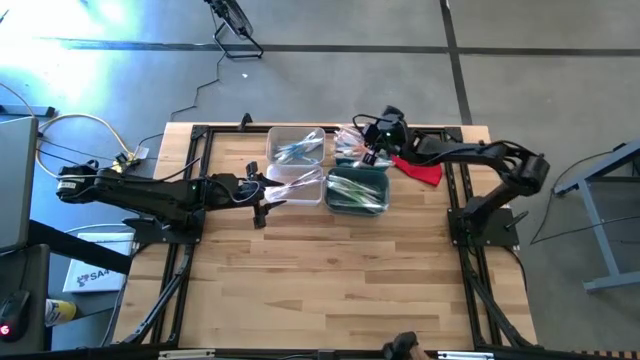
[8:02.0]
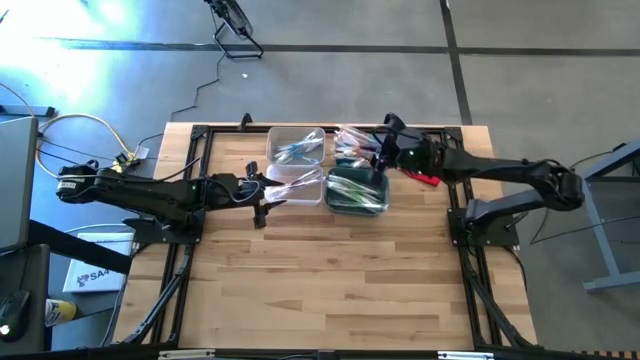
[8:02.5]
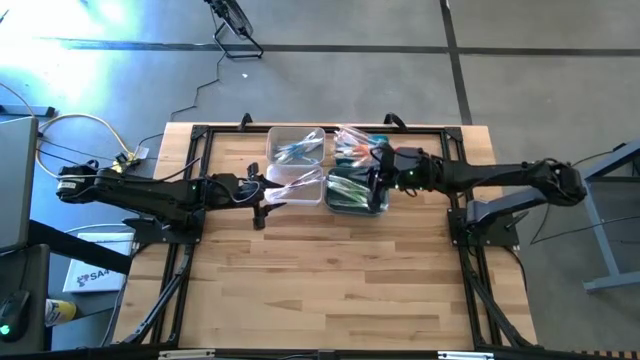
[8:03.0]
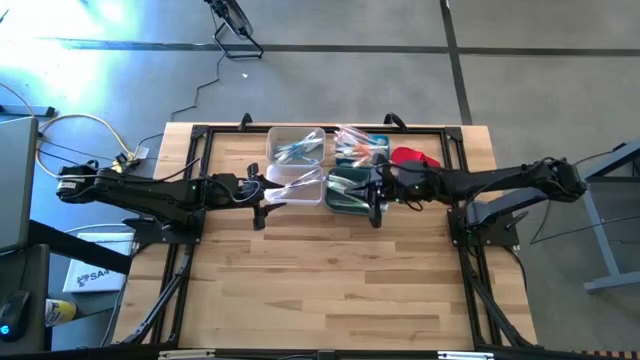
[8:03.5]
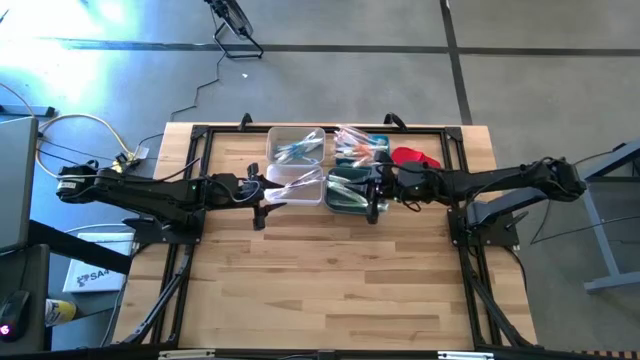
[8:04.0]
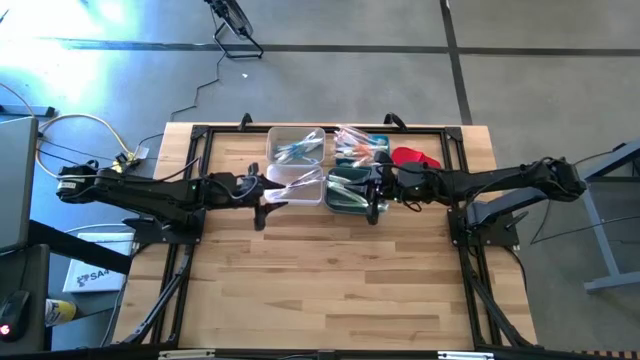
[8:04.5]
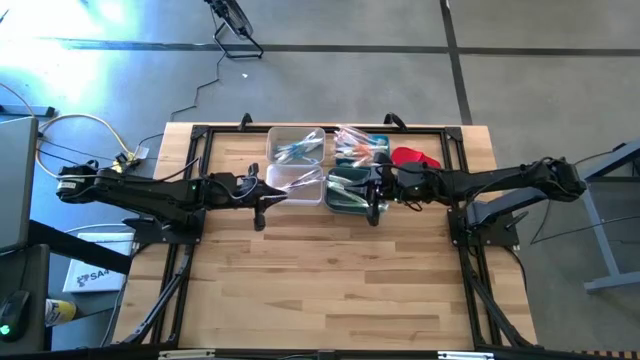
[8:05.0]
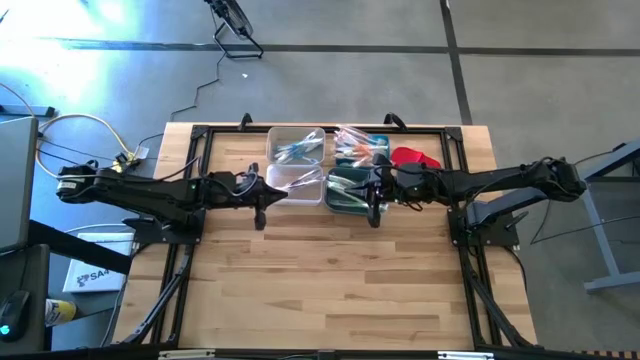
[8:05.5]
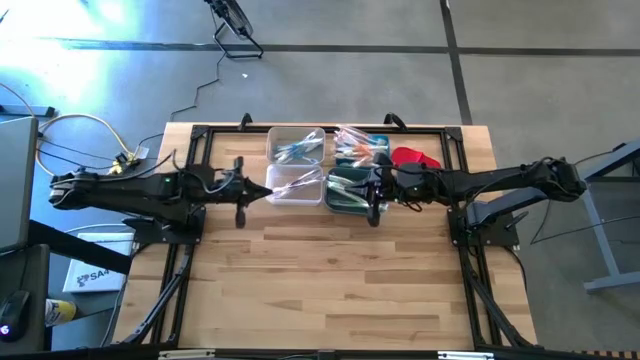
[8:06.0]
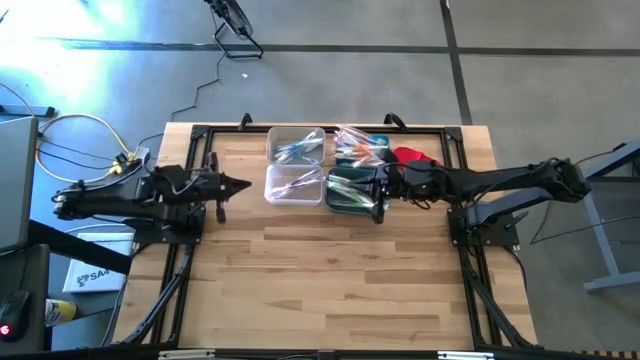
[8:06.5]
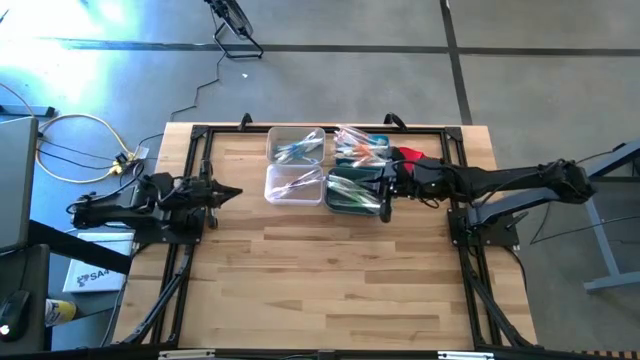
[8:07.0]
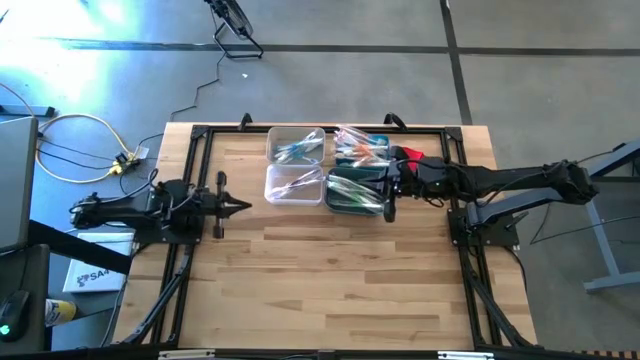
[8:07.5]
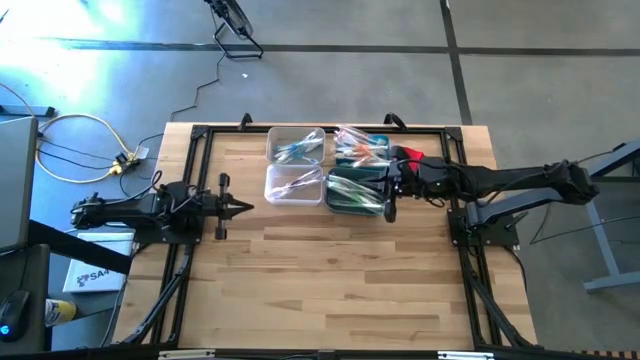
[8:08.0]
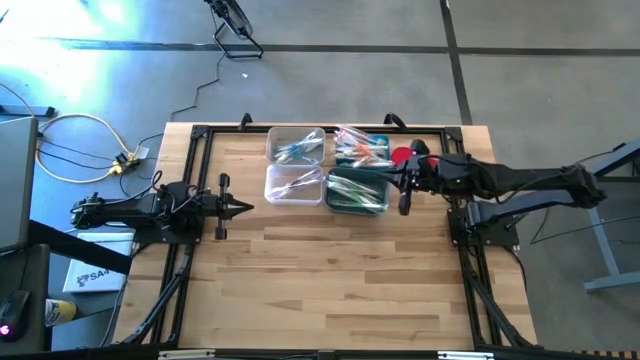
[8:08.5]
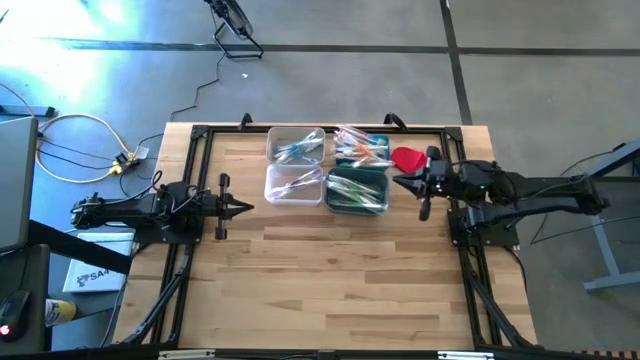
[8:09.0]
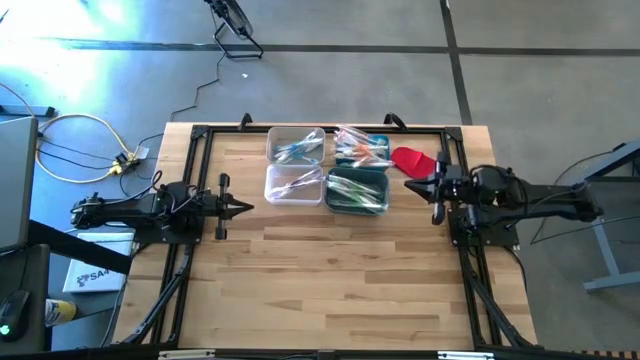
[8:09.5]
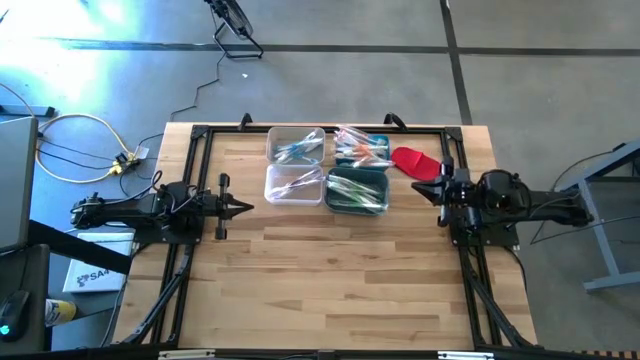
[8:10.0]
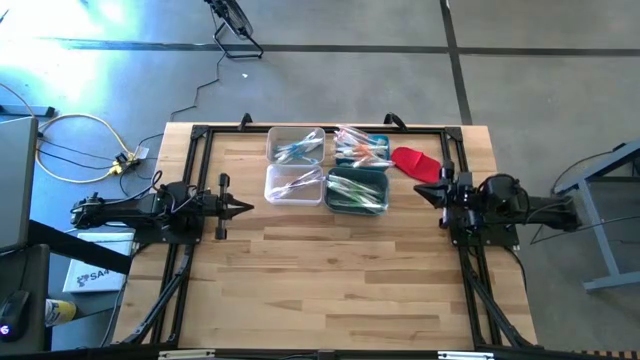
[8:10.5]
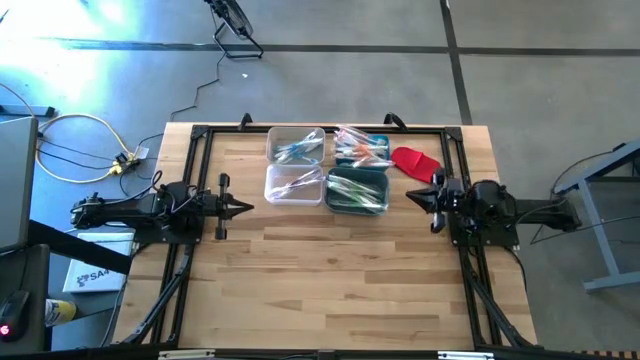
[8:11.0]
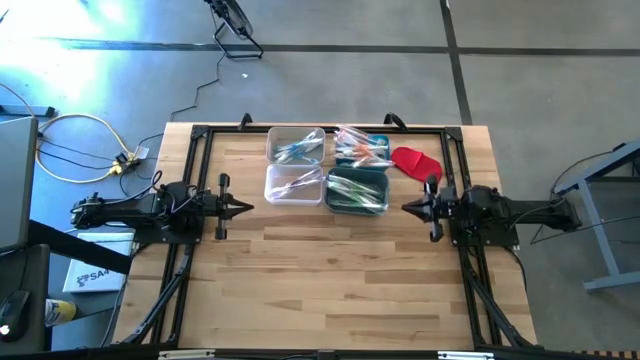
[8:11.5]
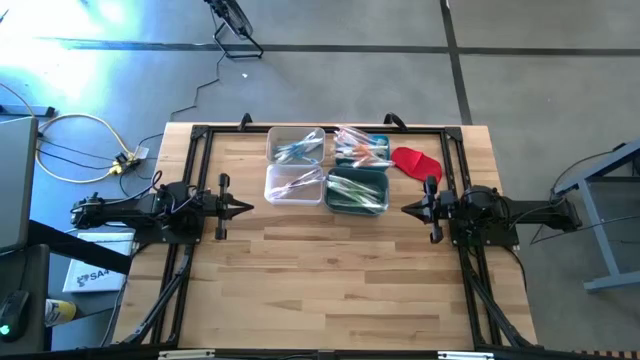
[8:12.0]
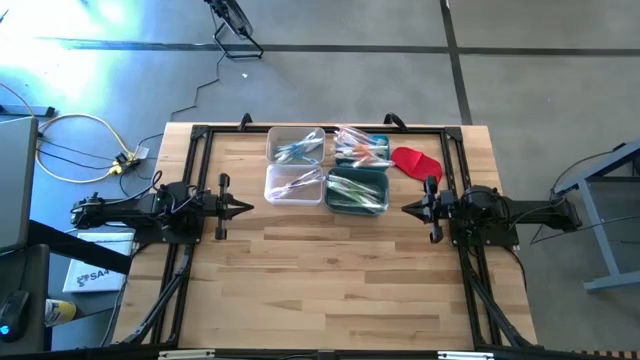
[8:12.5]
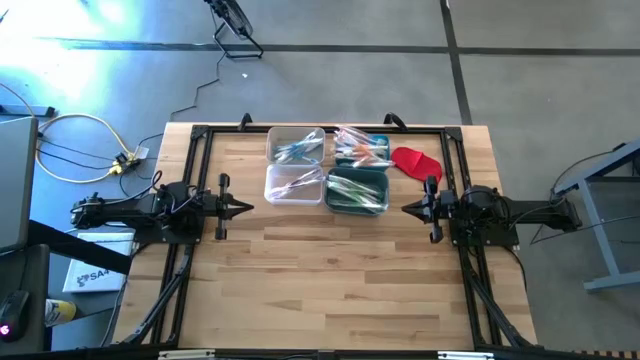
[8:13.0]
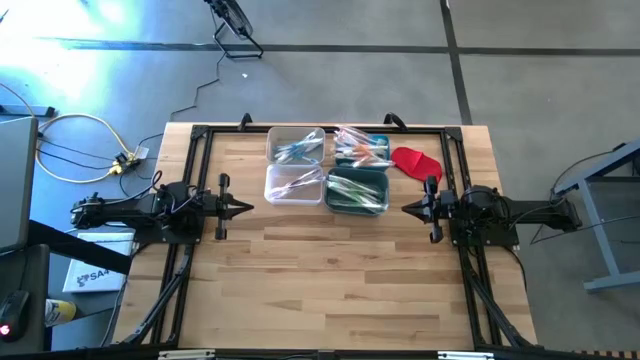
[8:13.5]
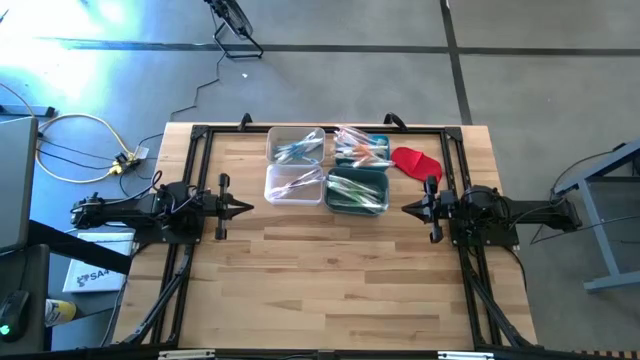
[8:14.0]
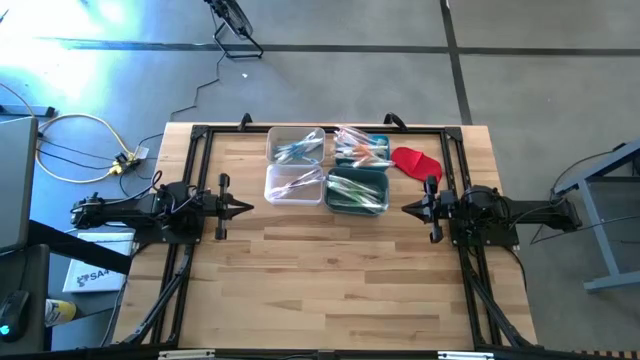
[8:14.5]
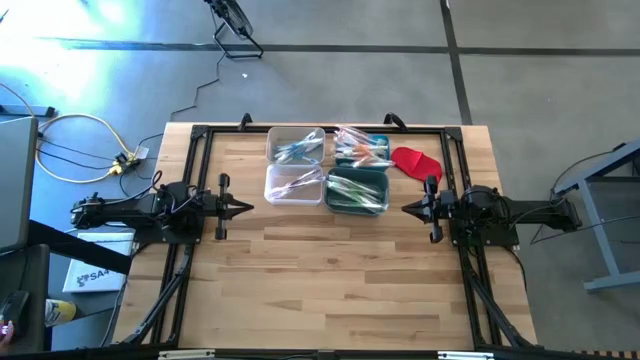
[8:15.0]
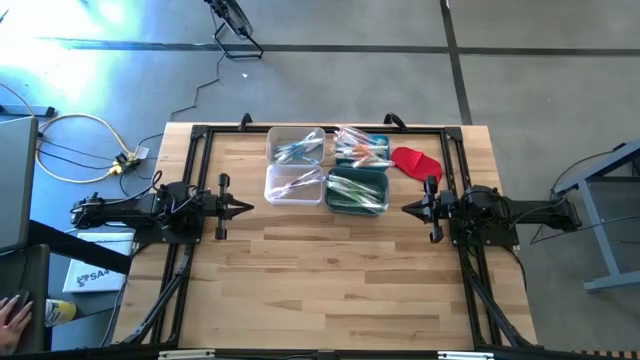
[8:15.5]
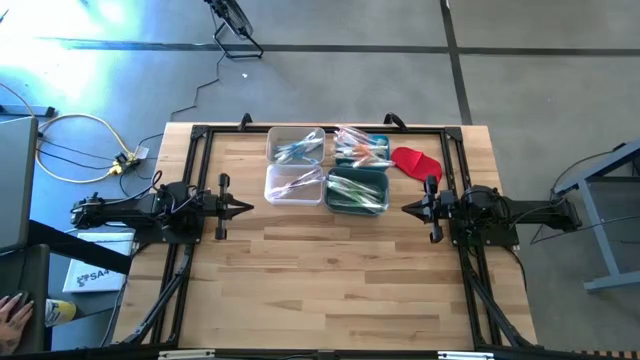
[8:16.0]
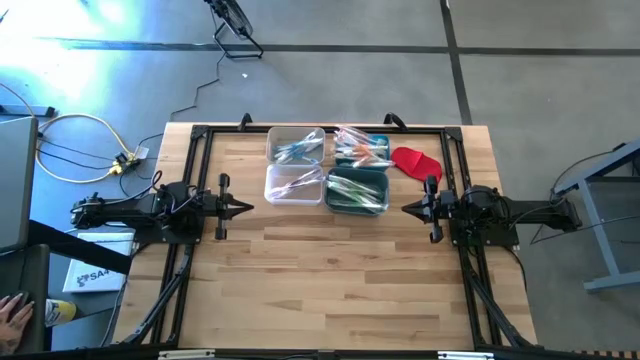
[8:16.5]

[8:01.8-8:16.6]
Task: Pick & Place Toothbrushes
Return to Home Position

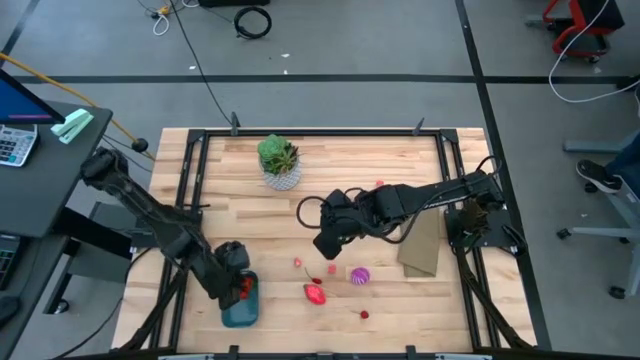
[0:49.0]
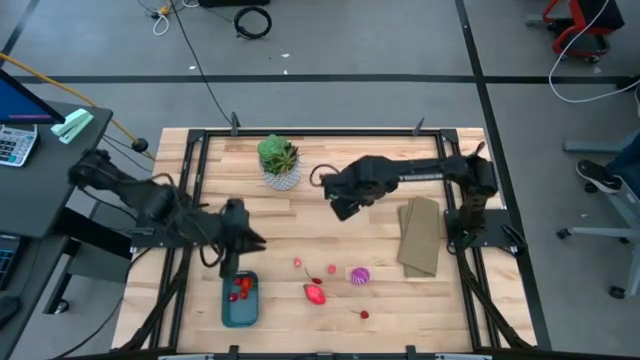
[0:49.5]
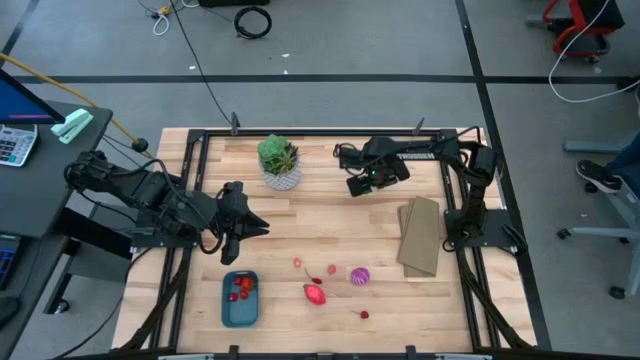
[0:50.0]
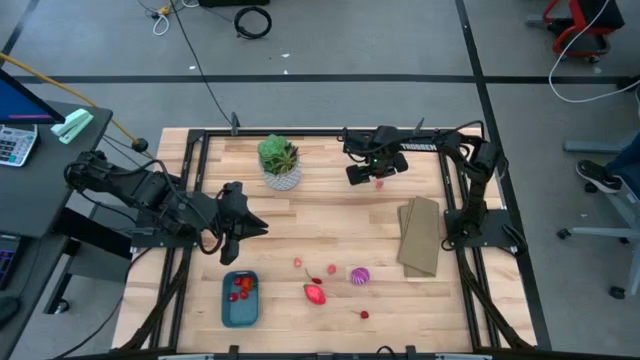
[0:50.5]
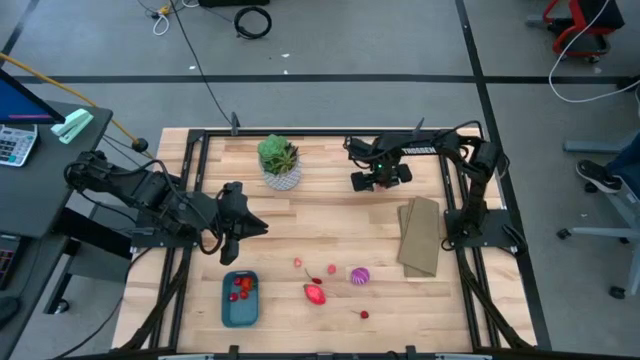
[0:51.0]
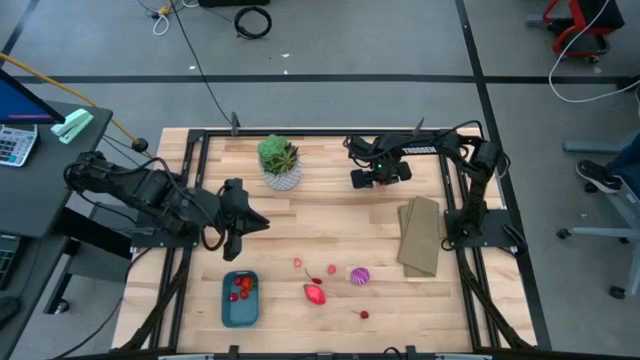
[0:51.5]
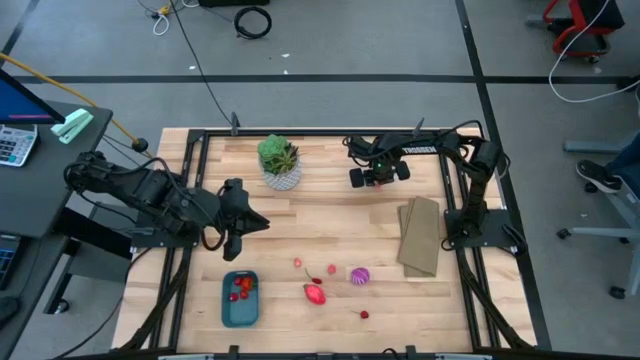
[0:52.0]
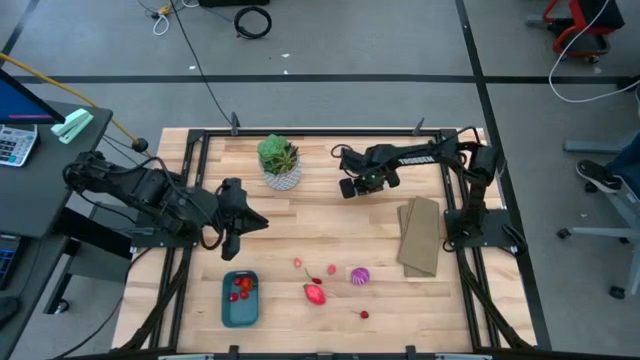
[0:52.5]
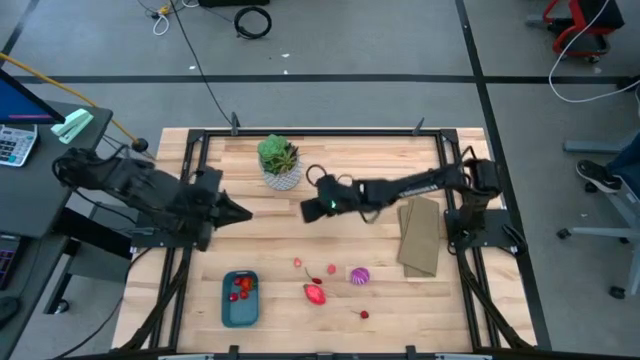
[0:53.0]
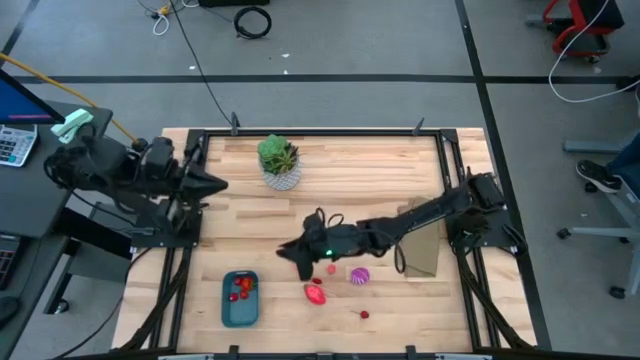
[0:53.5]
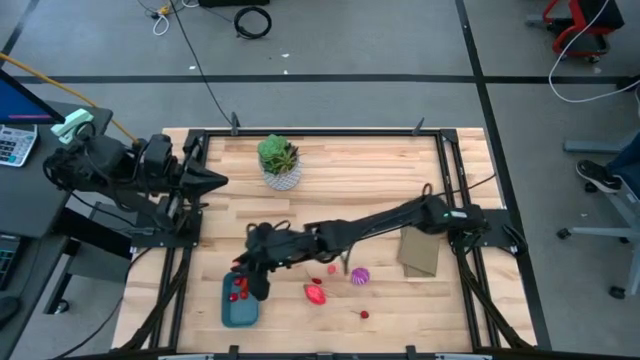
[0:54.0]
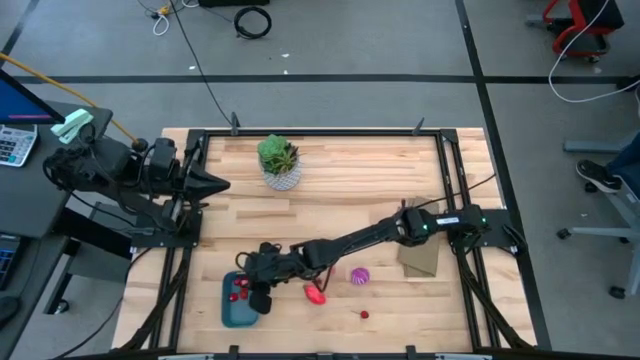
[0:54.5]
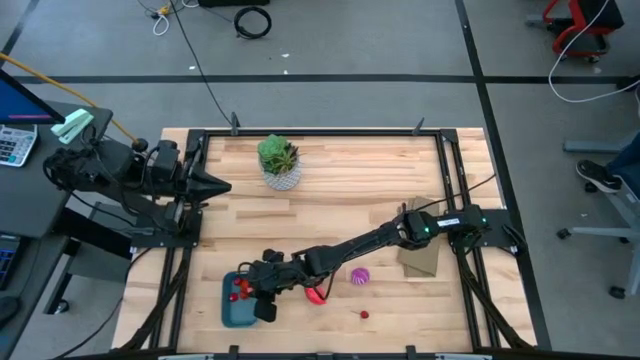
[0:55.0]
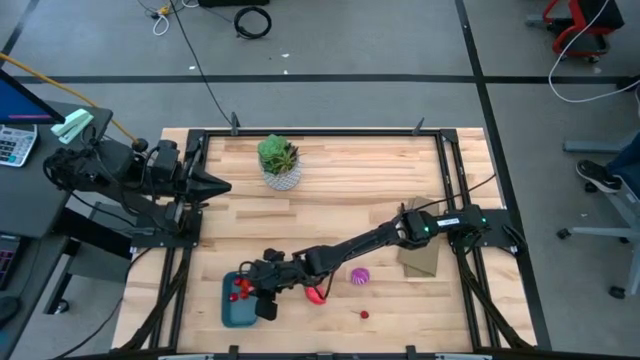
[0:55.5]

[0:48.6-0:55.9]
Task: Pick and placing Produce into tupperware
Put the top right peach into the bin
